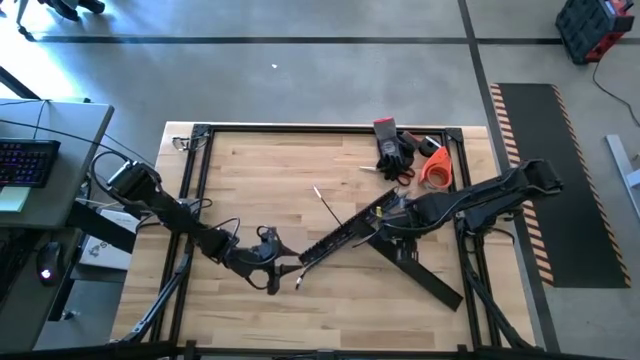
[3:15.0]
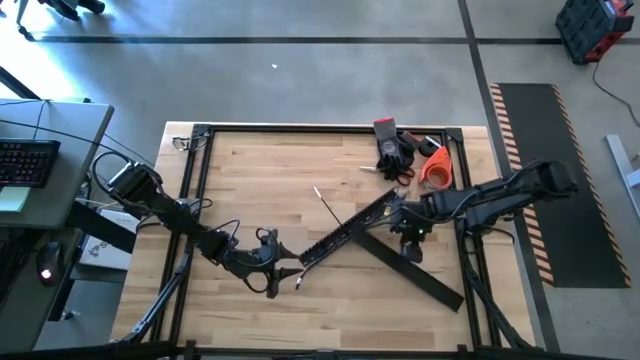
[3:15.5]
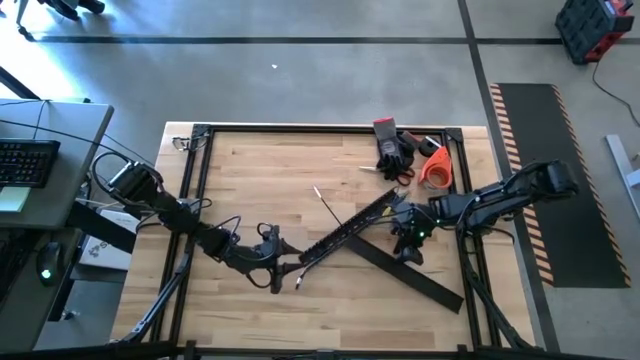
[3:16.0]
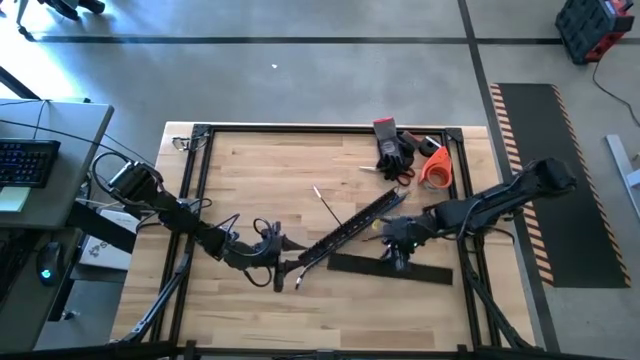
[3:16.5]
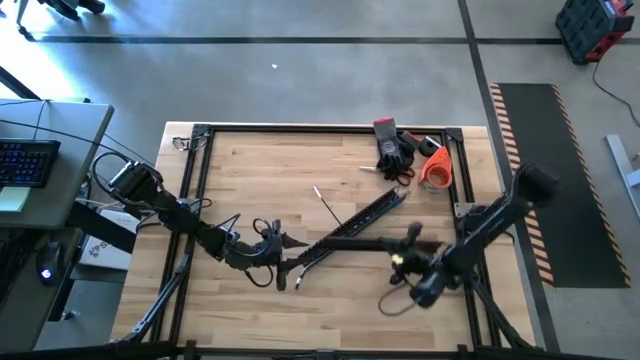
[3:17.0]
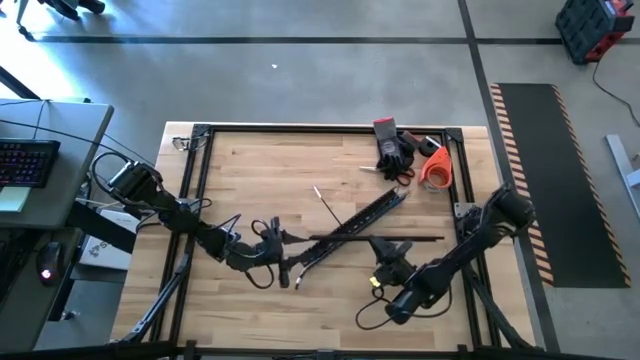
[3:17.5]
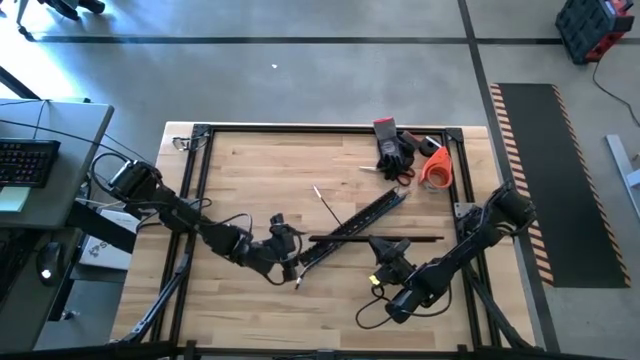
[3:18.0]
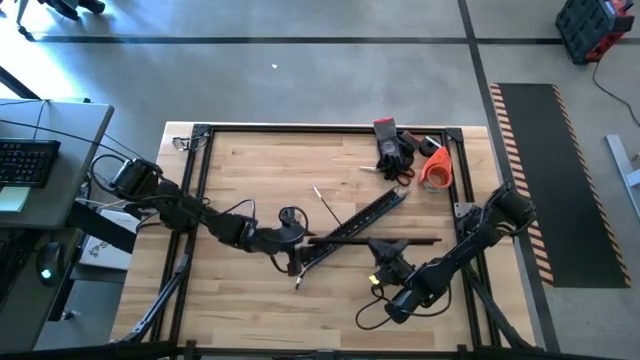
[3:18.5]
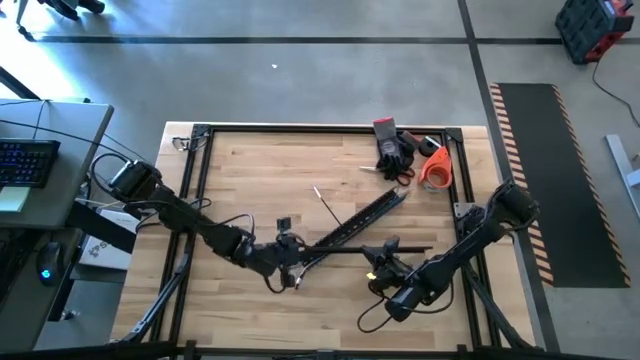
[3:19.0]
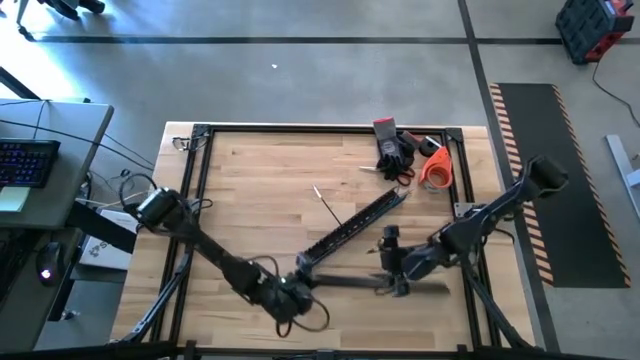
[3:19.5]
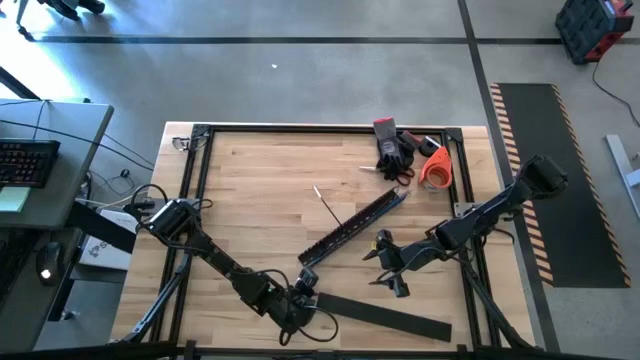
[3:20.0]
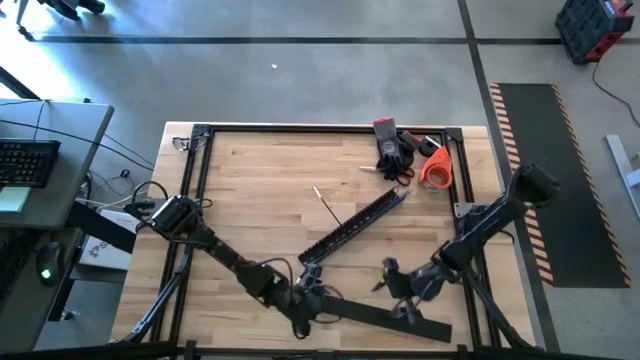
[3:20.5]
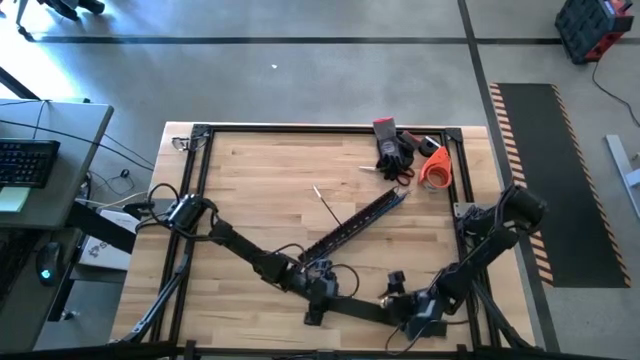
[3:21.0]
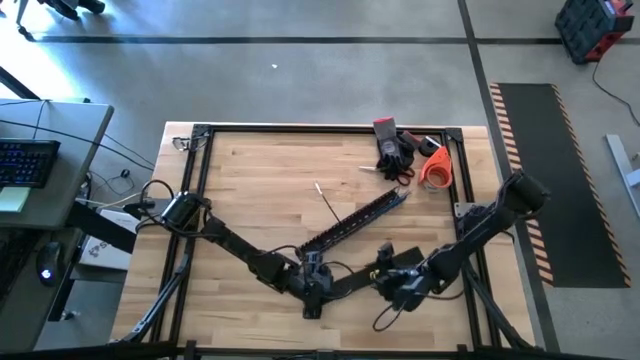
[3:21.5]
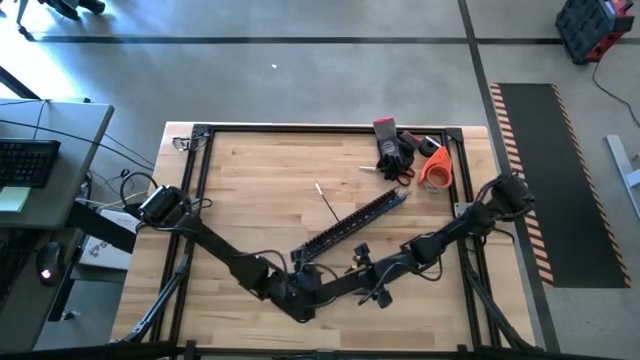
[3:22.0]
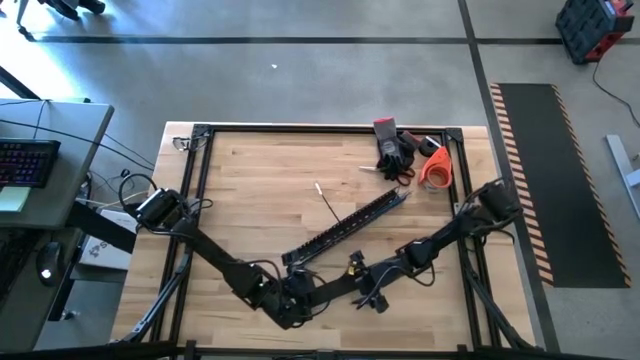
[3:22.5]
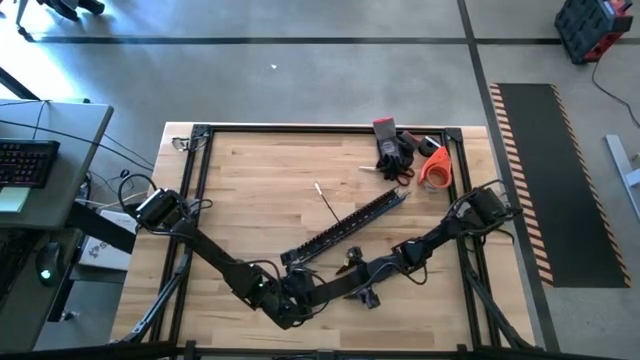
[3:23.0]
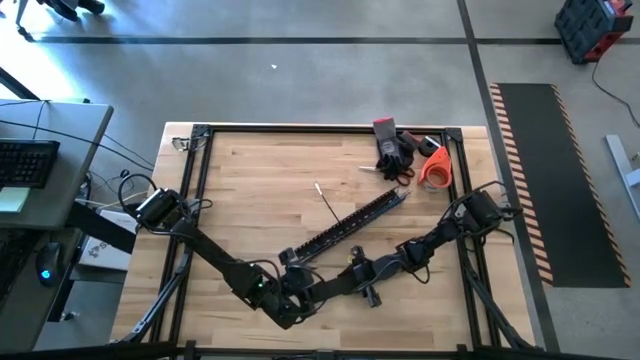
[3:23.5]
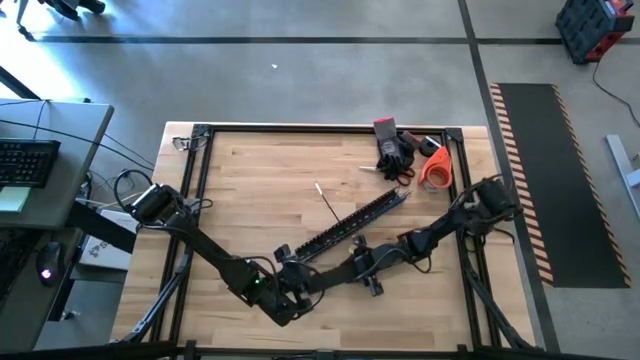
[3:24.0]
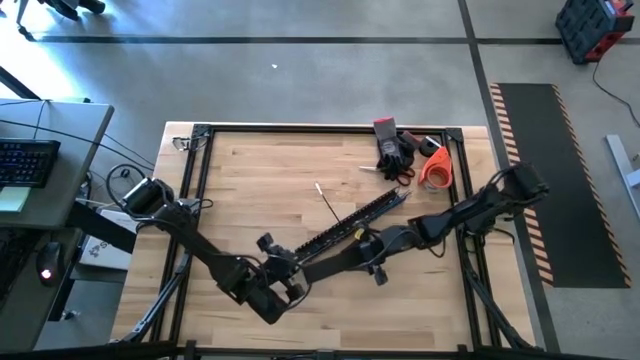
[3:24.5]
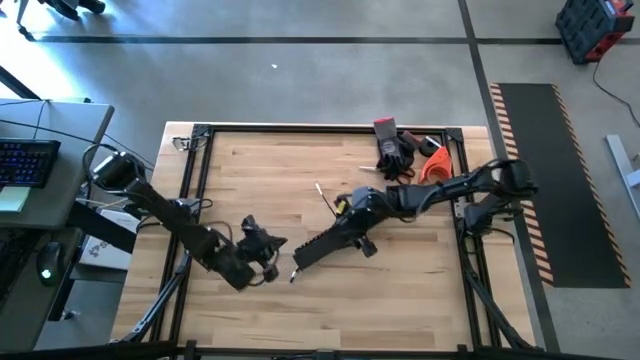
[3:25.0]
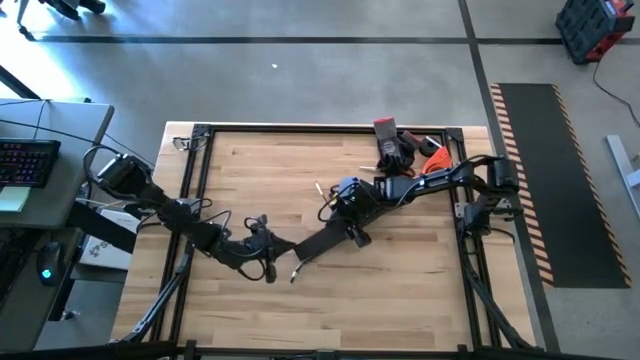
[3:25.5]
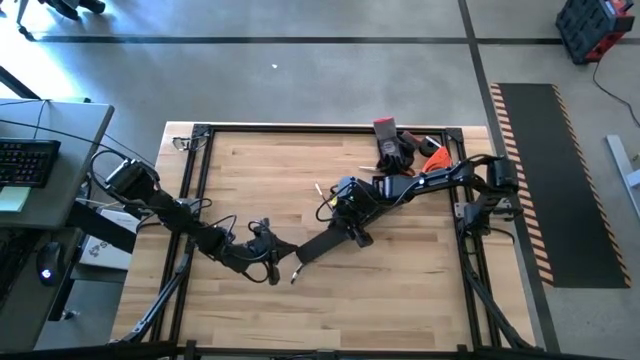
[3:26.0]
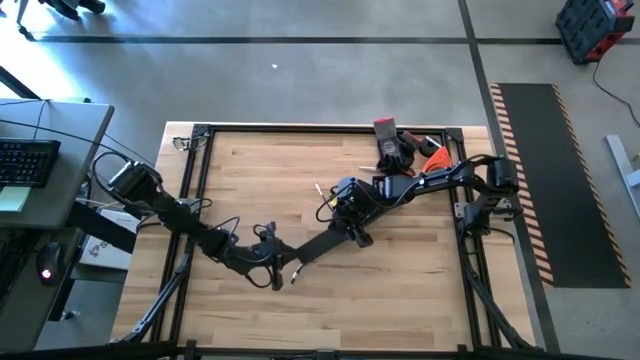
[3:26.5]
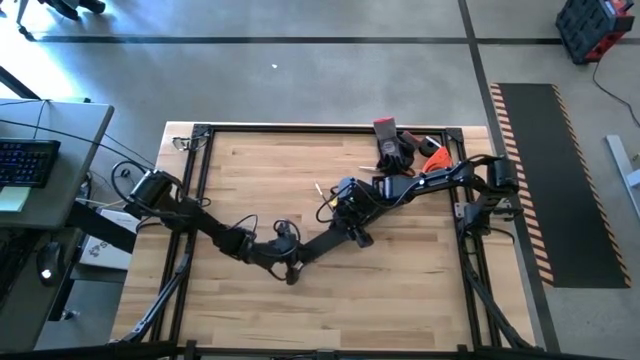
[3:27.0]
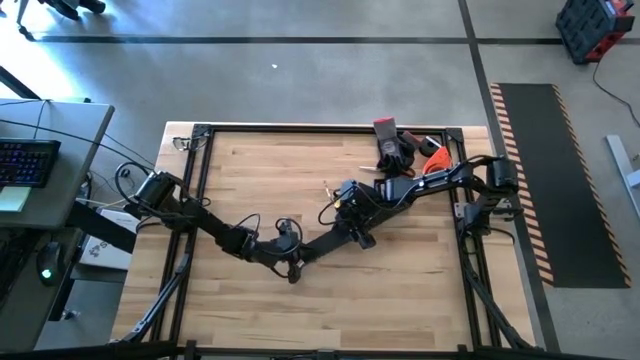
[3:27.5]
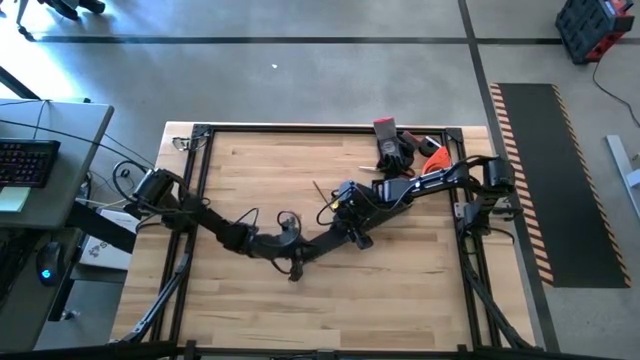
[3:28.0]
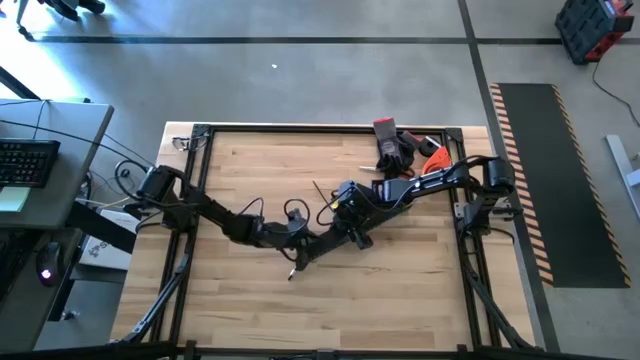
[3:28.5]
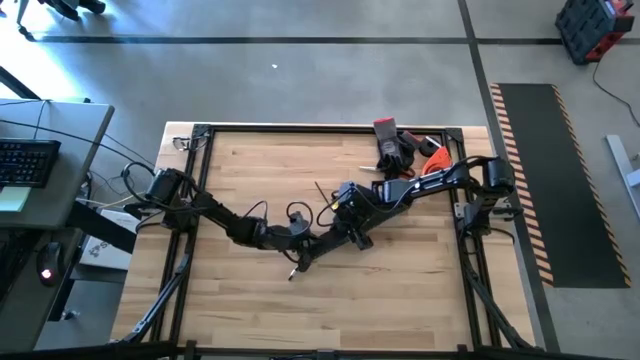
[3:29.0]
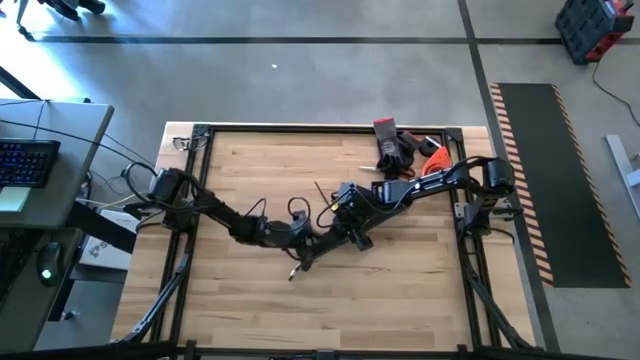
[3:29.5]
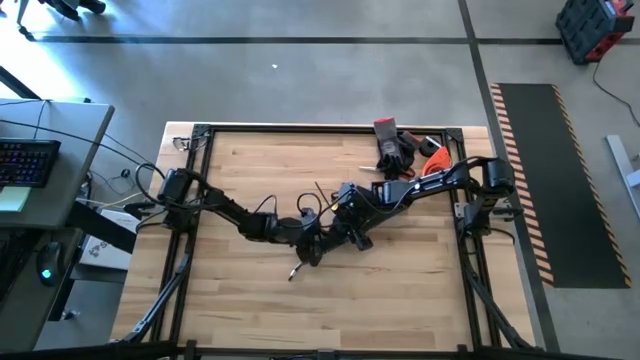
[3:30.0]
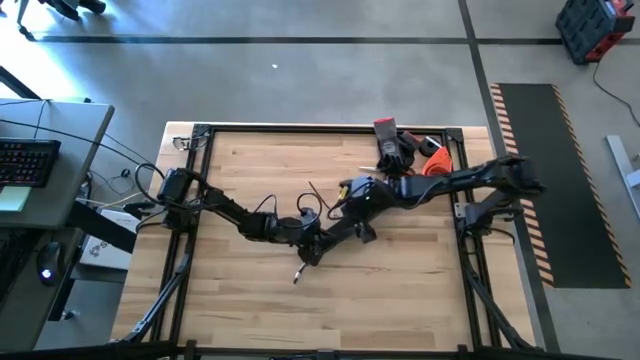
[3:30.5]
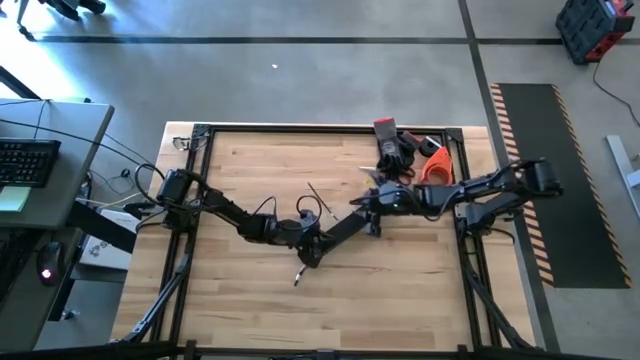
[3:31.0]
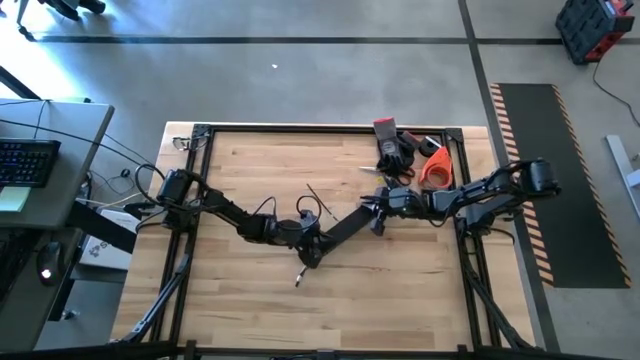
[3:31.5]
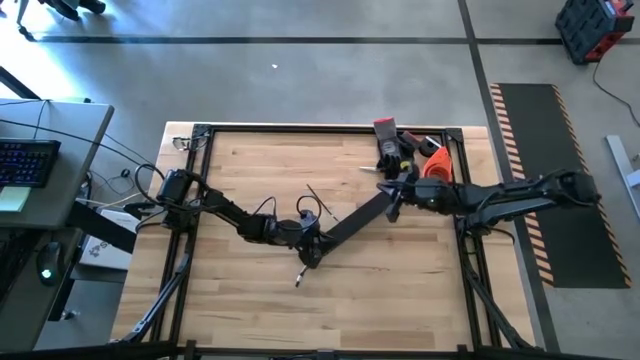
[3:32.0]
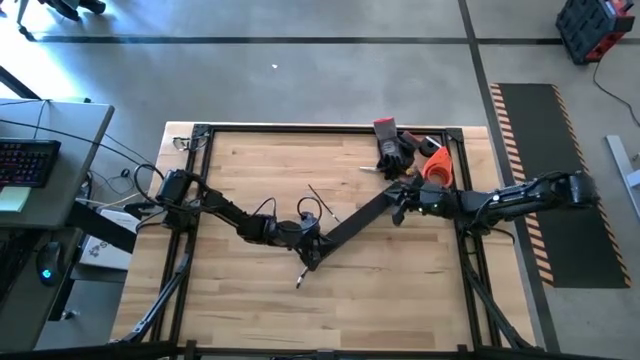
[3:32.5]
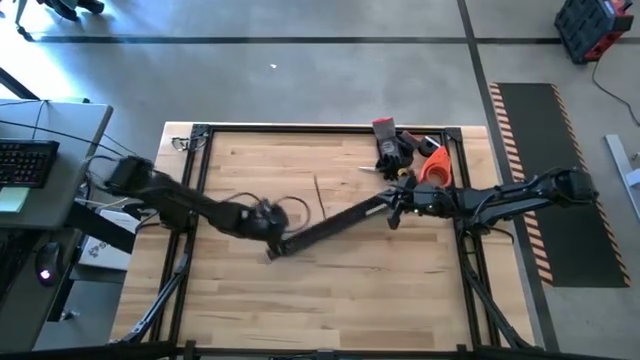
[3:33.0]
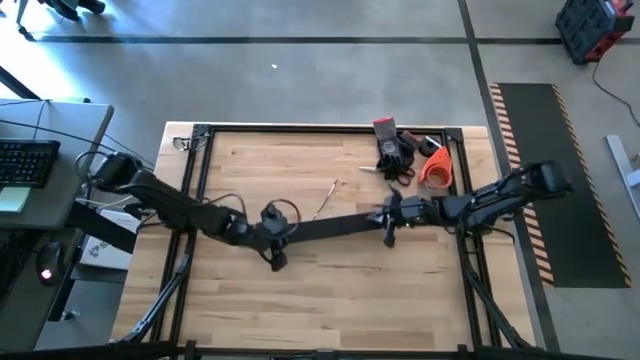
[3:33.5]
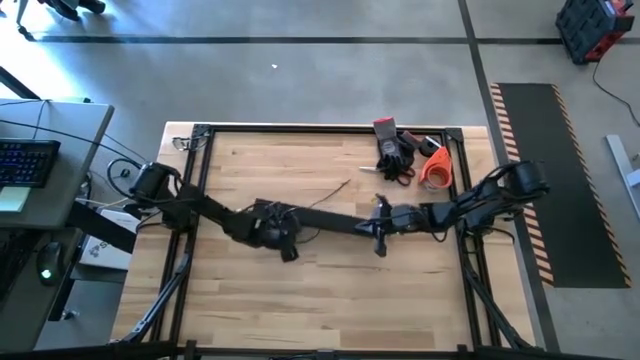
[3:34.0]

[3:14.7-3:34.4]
Task: Ziptie cables
Close the black cable duct with the black cable duct cover

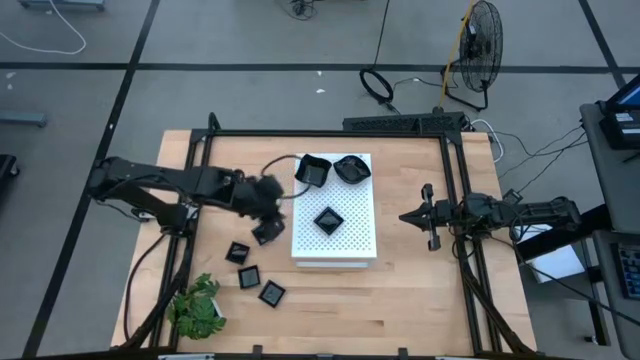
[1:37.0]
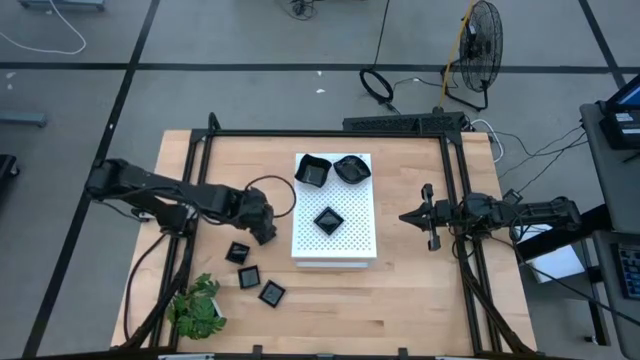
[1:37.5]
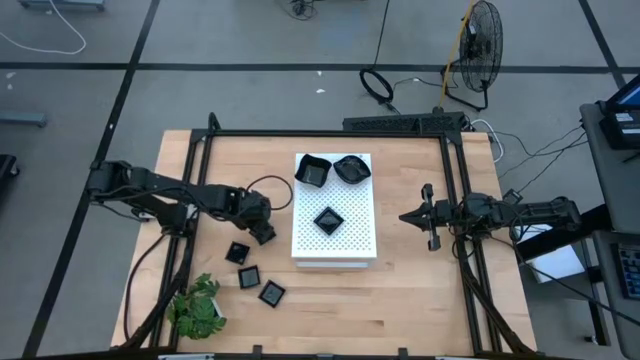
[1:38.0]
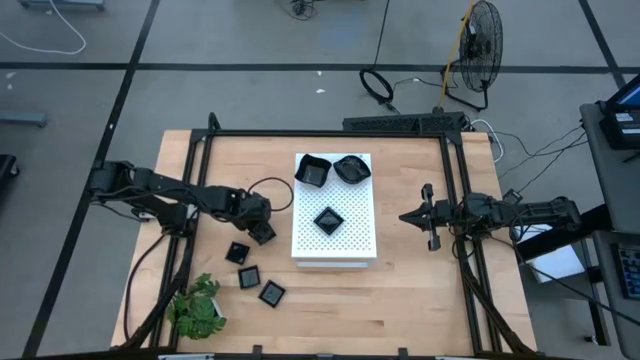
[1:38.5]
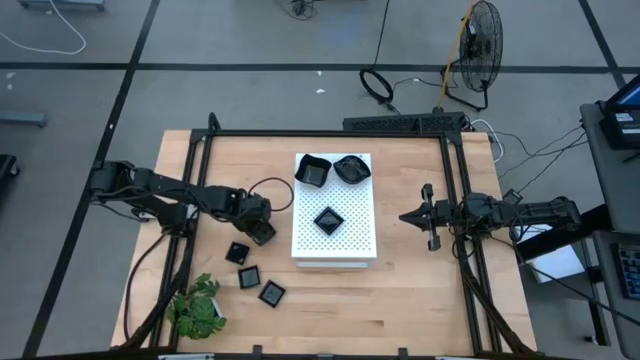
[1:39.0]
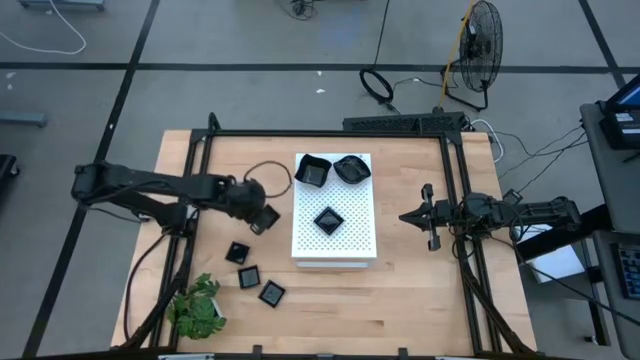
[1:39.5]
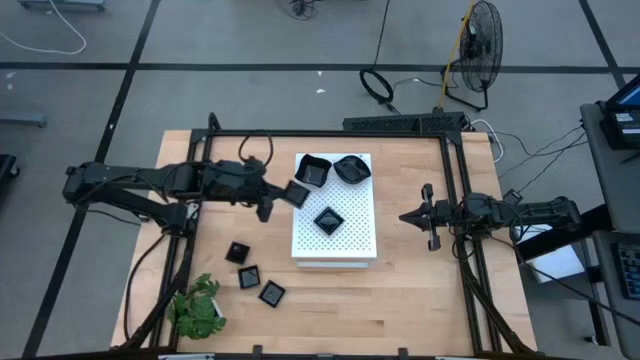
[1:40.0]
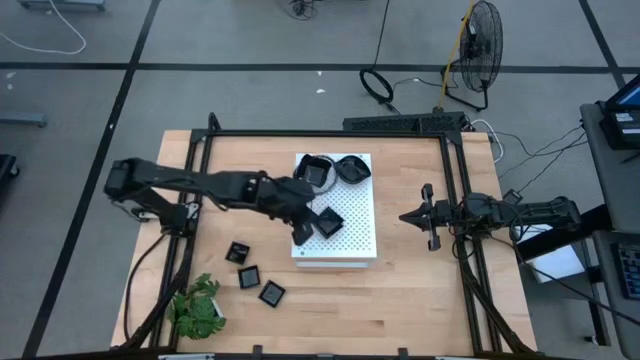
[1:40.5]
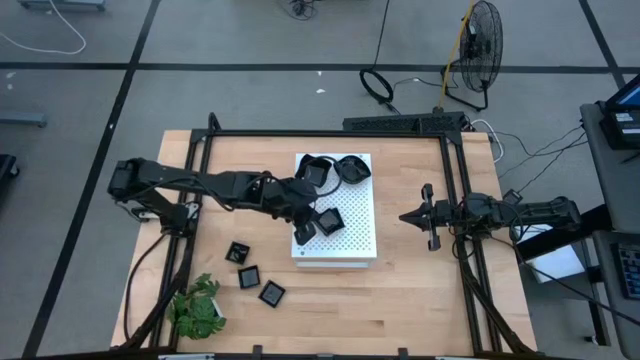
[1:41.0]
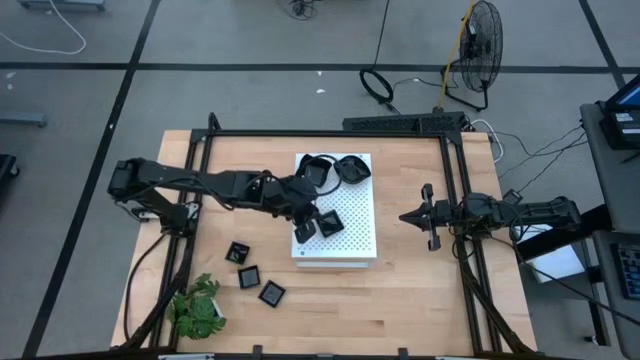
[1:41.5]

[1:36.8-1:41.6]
Task: Pick & Place Mini shaped plates
Stack the black square plate on top of the other black square plate on the shelf
